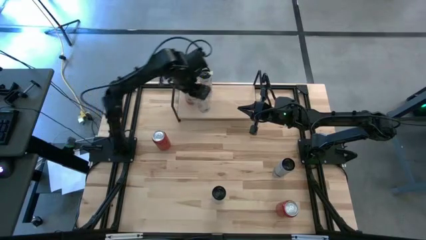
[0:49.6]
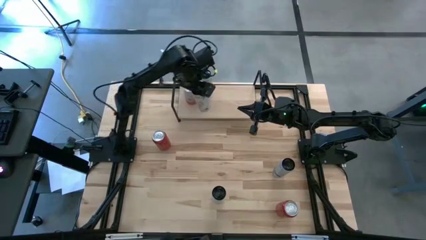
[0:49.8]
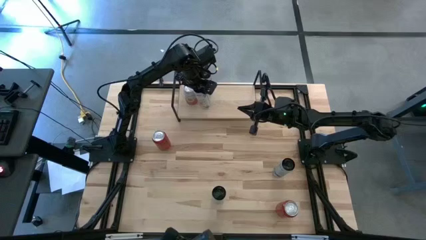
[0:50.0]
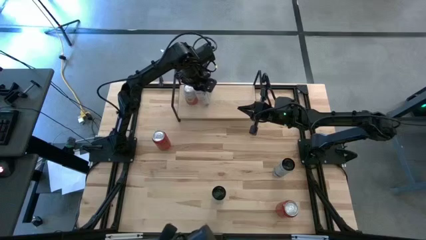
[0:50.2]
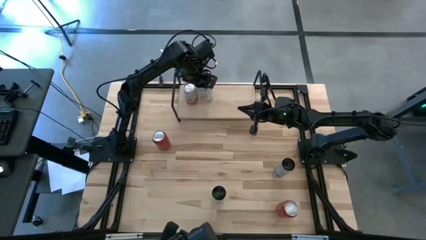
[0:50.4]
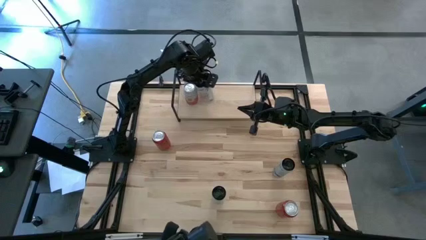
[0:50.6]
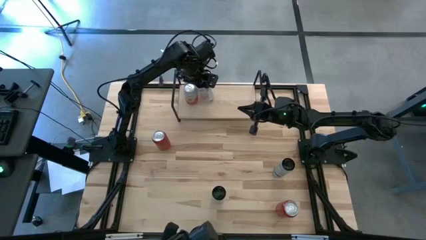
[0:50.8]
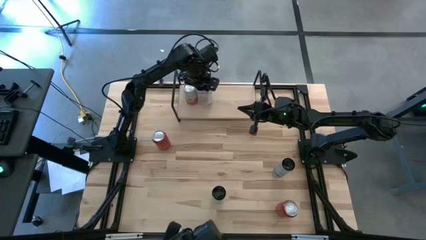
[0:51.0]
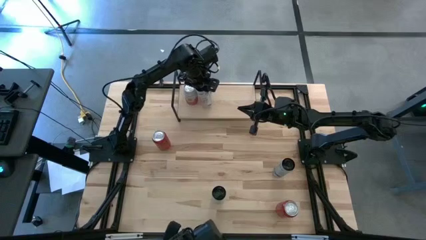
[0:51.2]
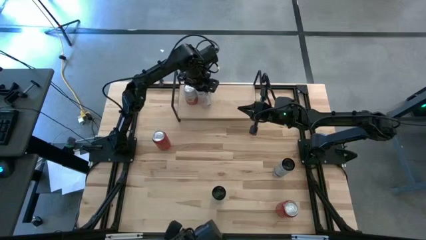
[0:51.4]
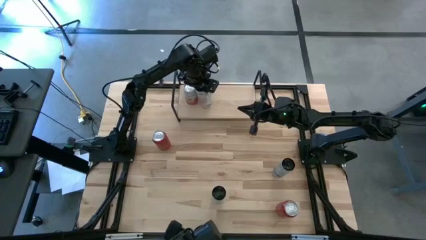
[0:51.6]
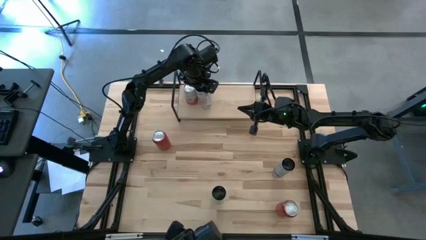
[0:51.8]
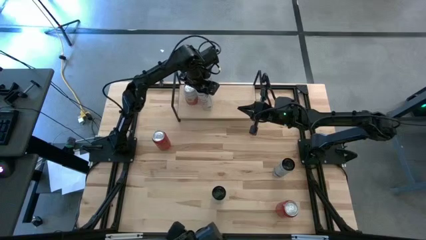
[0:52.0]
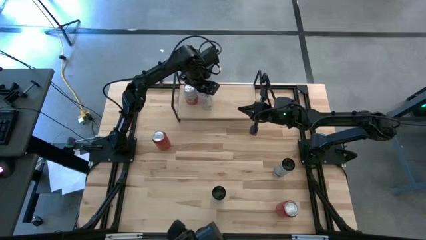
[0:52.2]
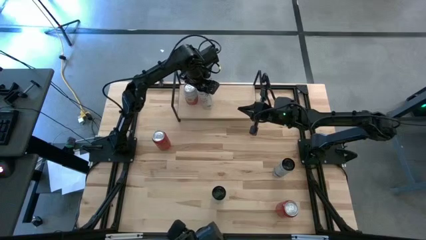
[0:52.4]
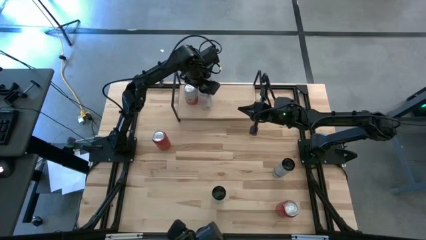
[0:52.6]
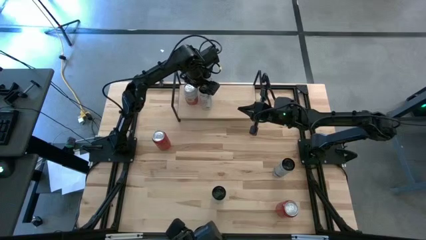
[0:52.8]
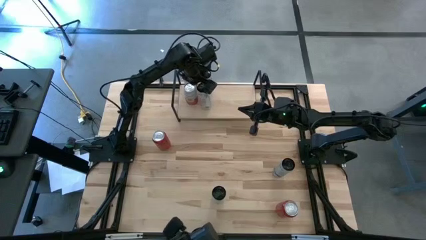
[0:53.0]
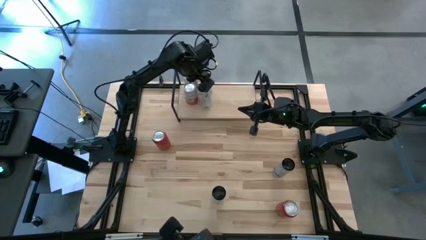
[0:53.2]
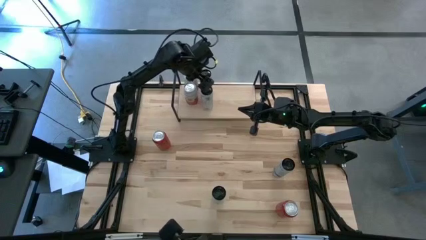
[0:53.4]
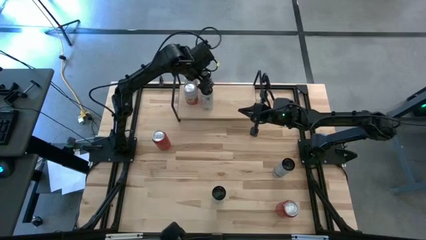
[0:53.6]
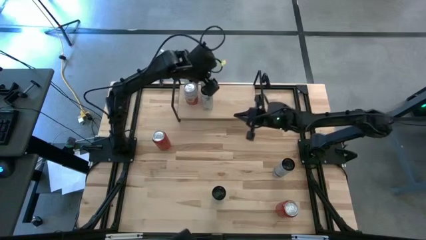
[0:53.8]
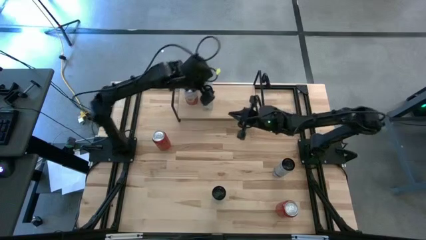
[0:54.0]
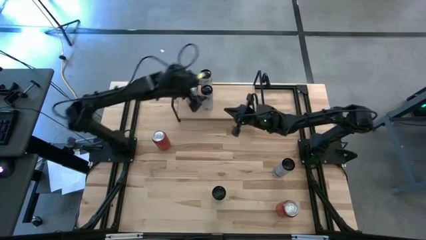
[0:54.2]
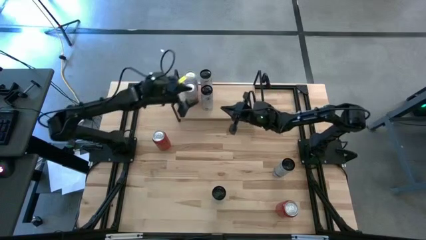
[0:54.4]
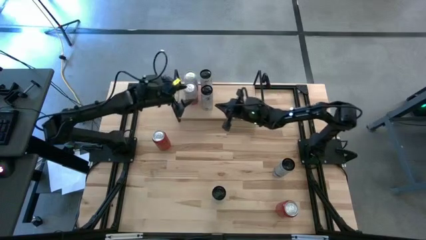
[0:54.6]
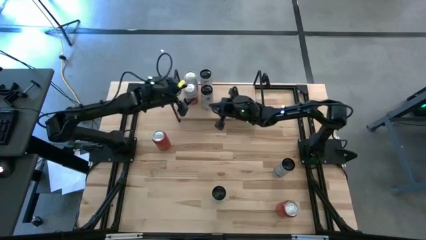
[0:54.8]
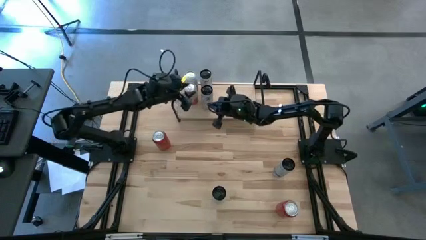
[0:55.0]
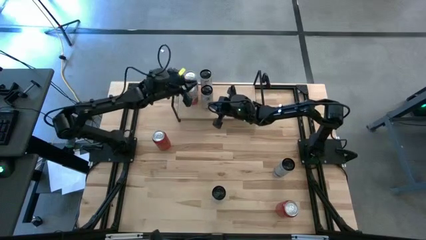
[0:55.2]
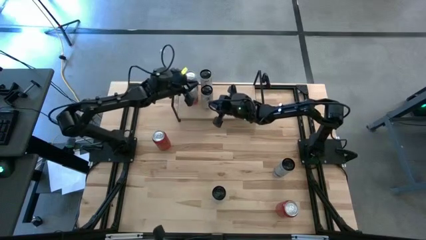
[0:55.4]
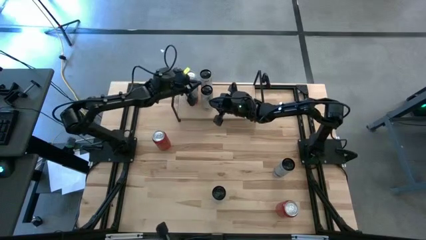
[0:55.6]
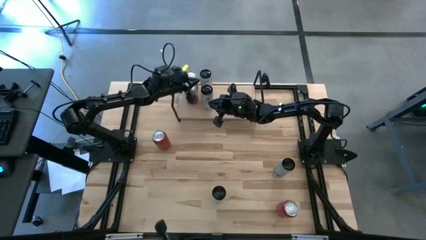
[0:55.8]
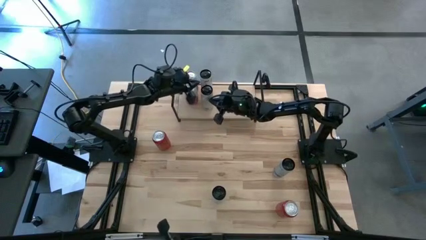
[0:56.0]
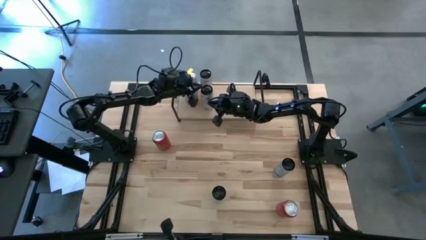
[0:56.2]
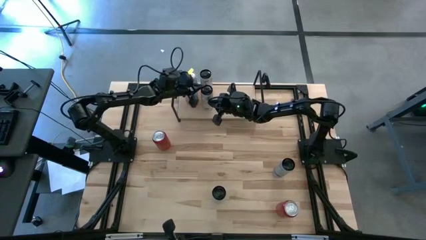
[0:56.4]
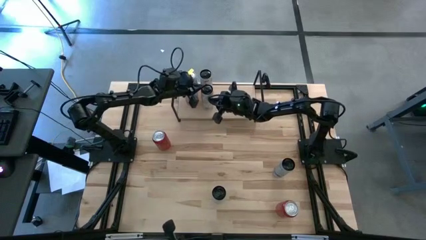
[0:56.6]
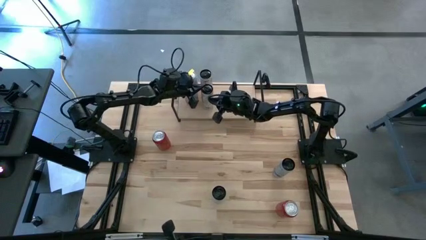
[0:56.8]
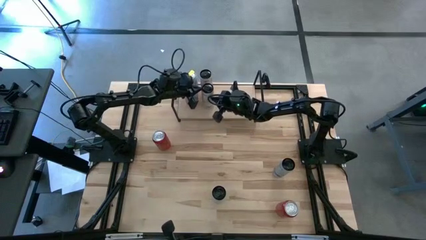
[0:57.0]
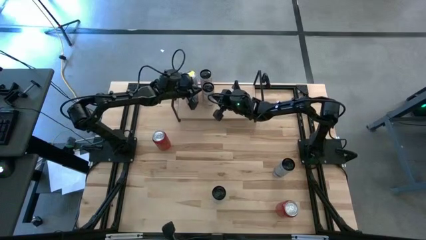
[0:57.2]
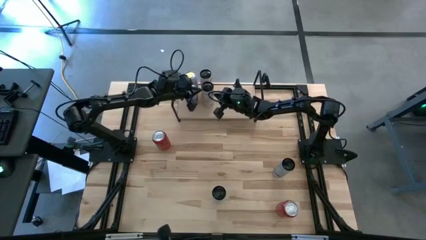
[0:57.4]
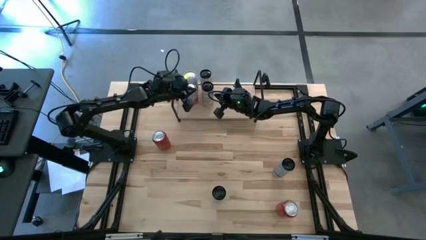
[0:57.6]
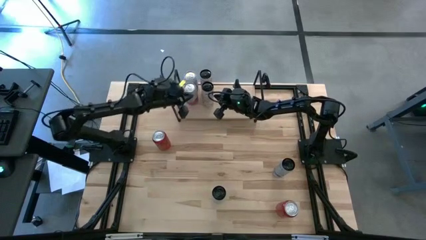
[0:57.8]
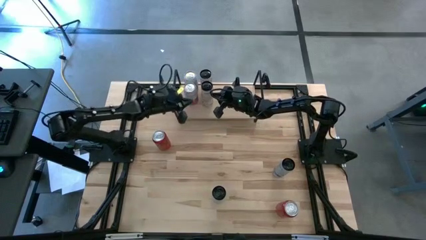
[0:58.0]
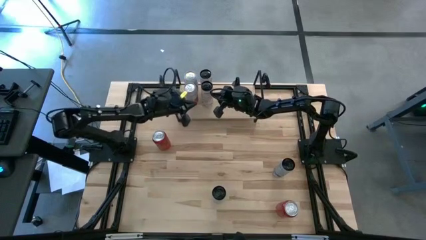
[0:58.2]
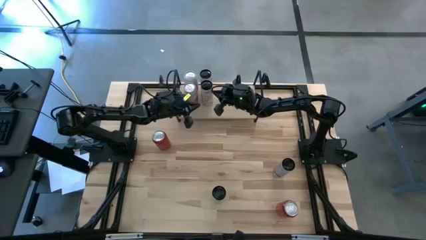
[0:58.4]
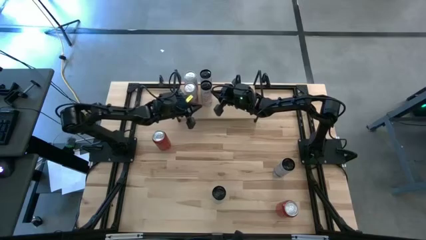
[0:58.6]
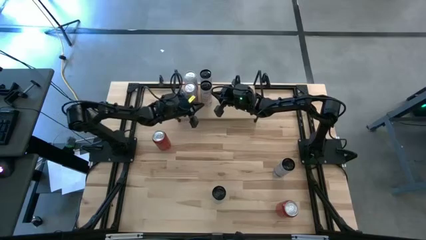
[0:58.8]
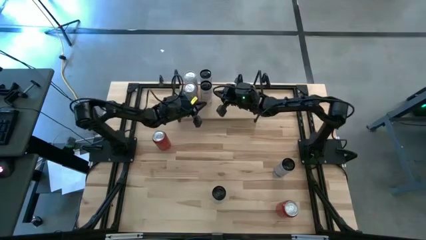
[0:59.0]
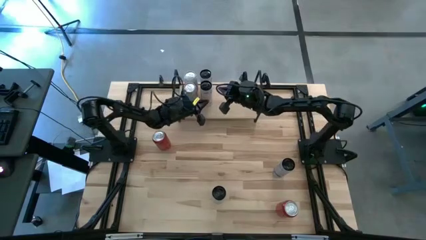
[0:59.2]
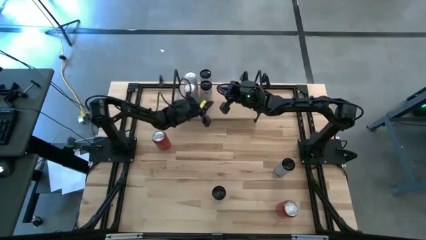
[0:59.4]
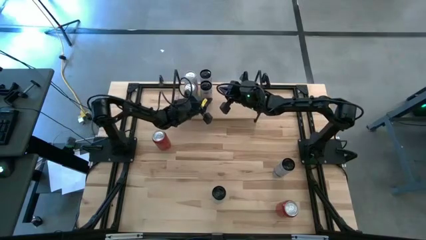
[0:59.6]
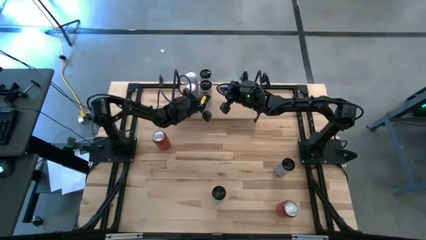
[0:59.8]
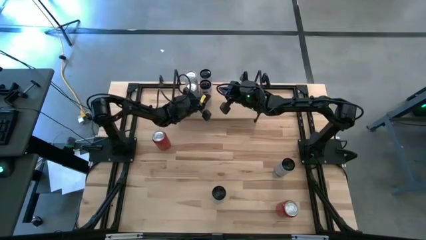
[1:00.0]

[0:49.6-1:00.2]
Task: Place canned beverage on shelf
Put the white pink soda can on the shelf aligned with the other white pink soda can
